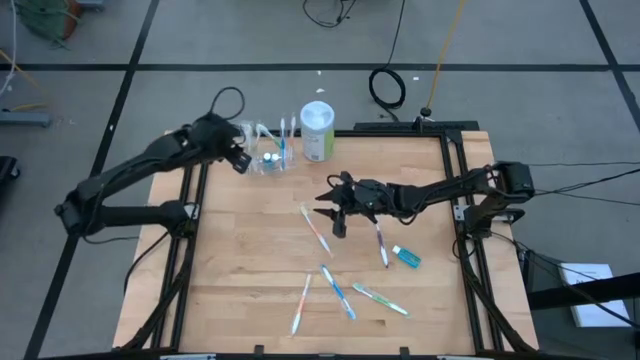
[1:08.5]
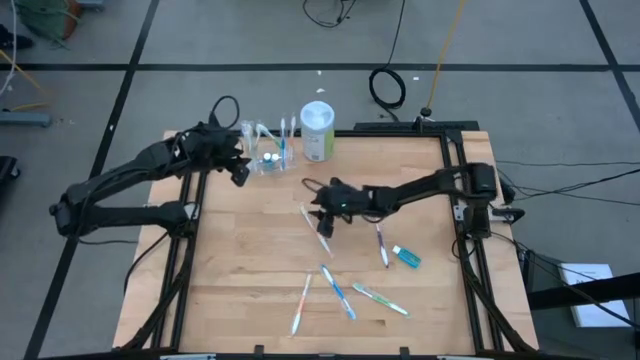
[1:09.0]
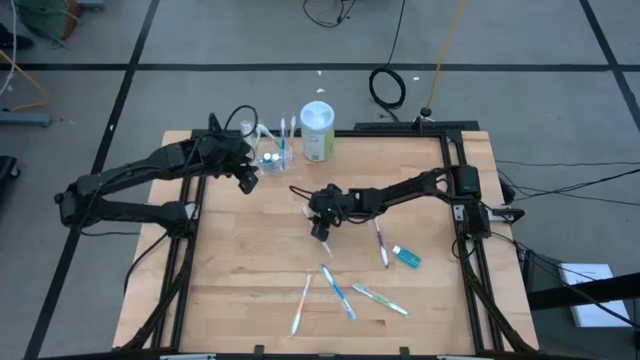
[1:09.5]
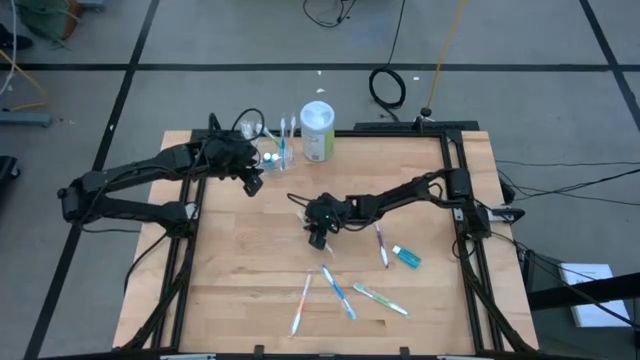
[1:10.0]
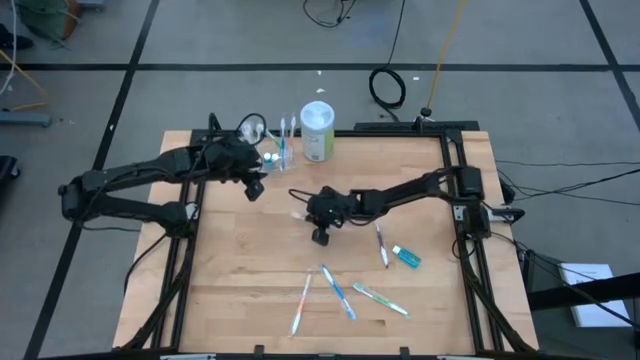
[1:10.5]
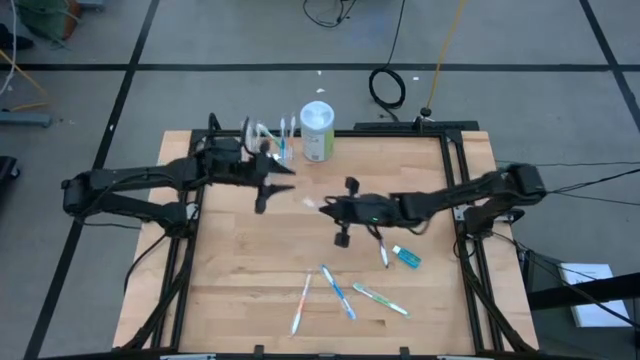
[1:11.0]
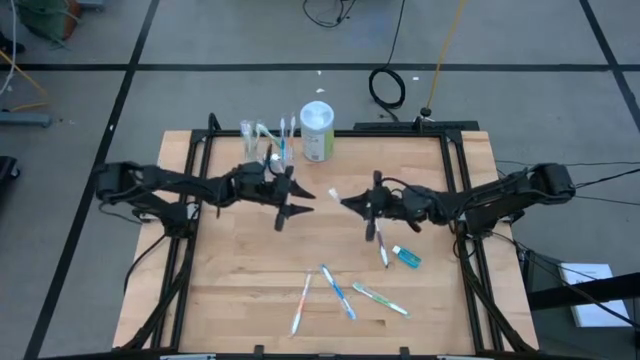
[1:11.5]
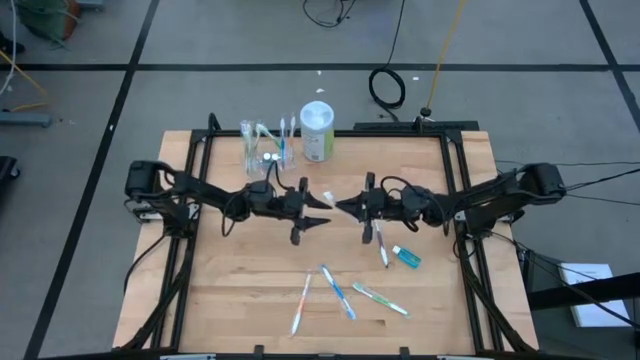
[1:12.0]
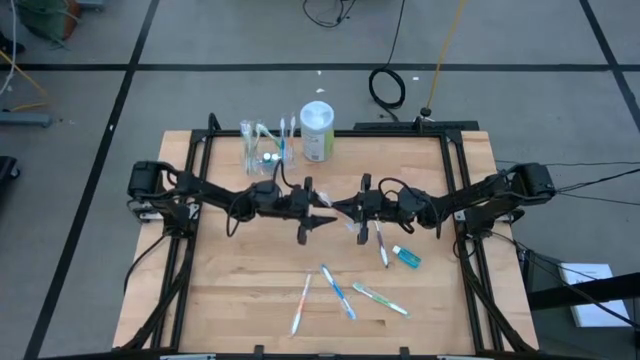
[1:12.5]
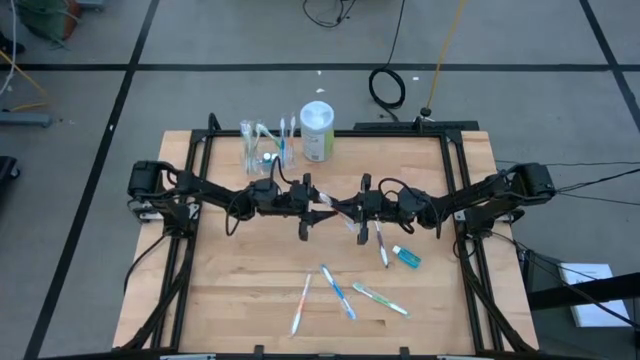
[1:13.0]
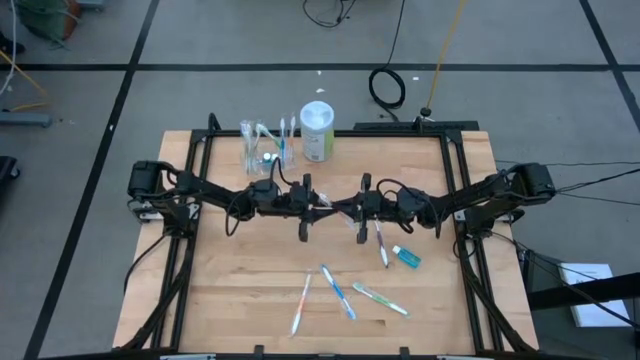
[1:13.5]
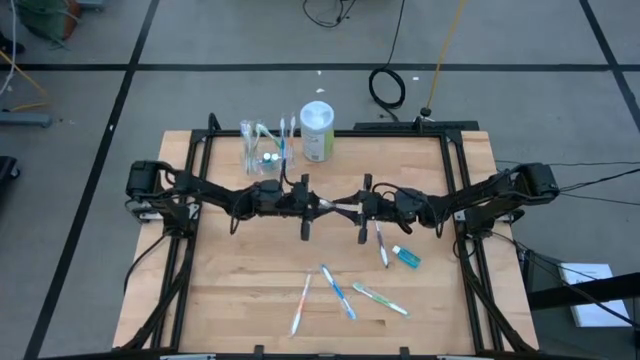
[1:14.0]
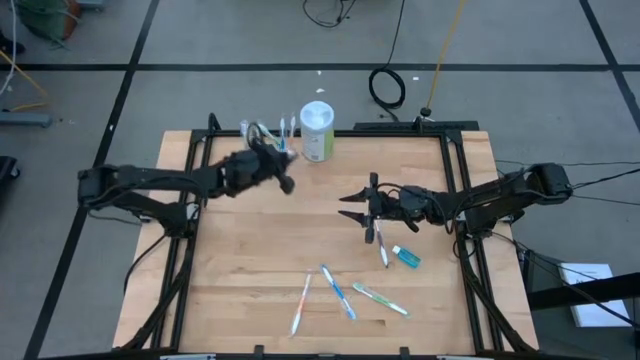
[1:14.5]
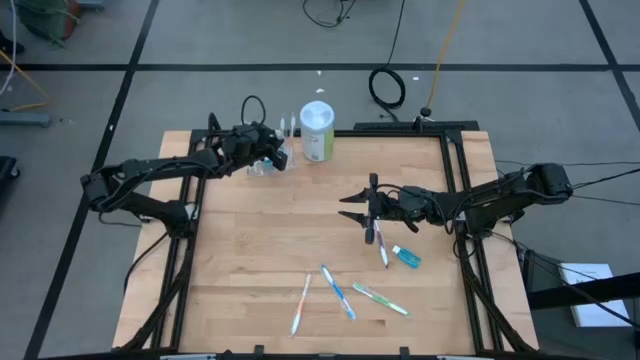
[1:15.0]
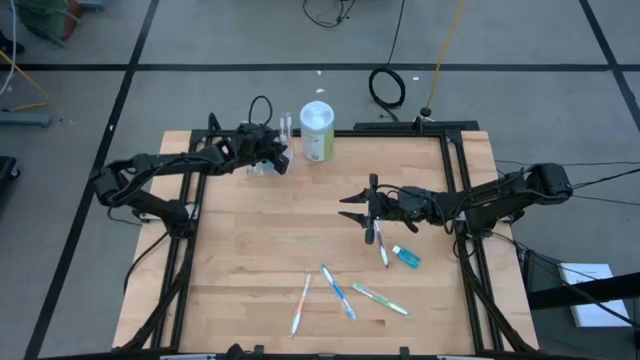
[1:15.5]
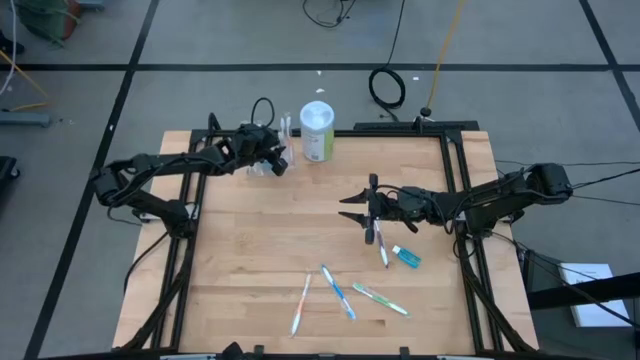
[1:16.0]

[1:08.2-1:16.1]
Task: Pick & Place toothbrushing station
Put the top orange toothbrush into the transparent organizer

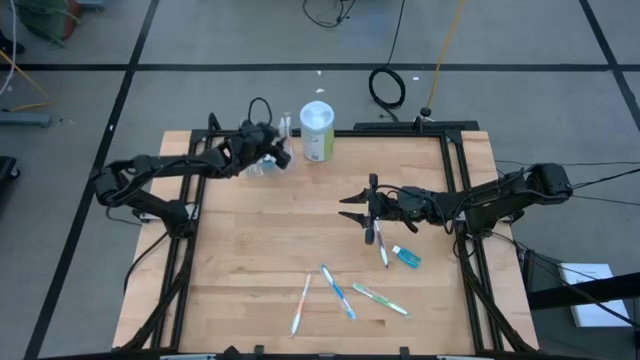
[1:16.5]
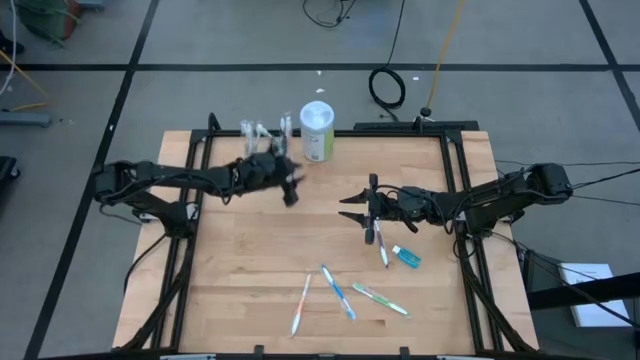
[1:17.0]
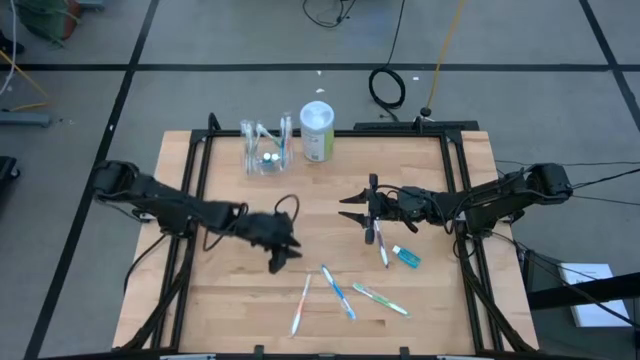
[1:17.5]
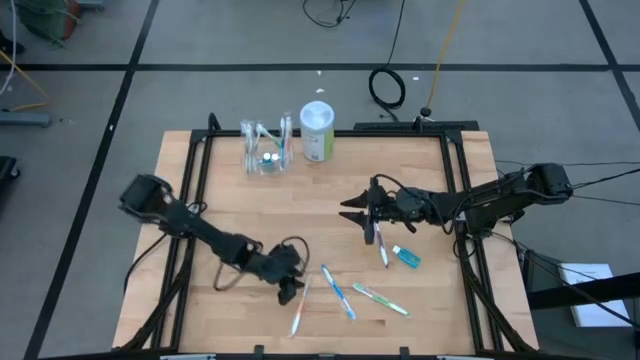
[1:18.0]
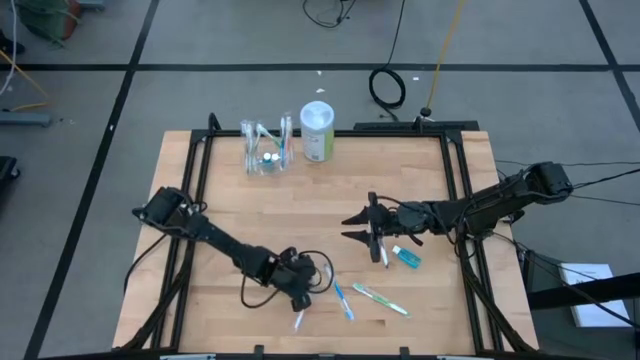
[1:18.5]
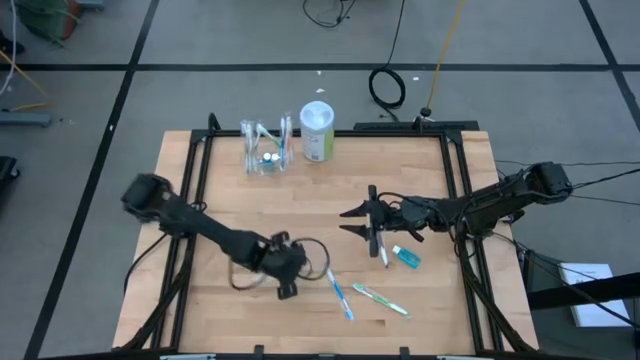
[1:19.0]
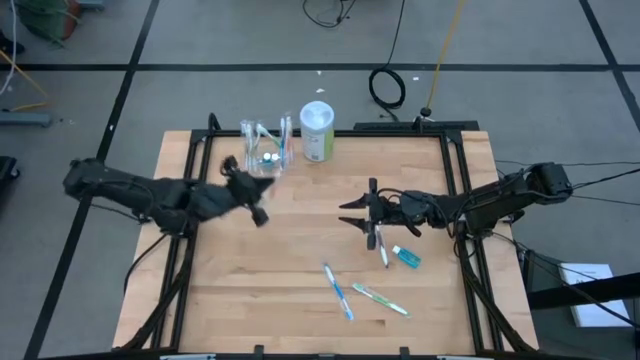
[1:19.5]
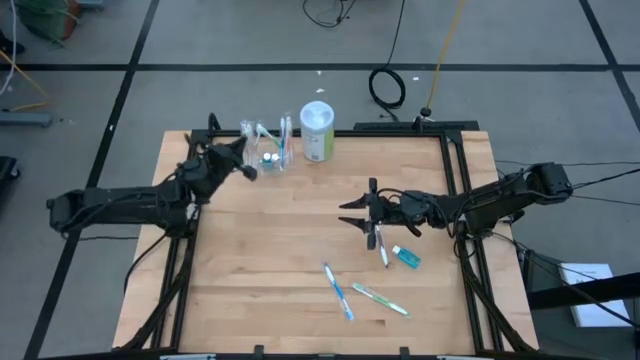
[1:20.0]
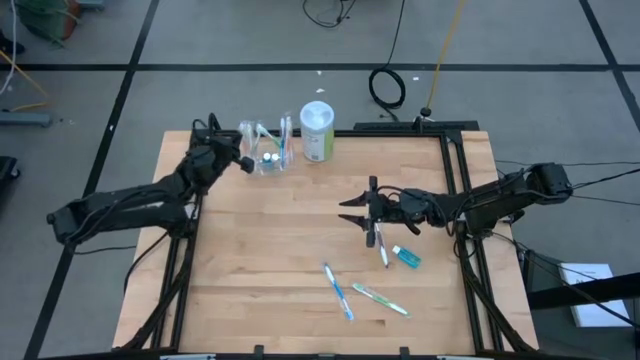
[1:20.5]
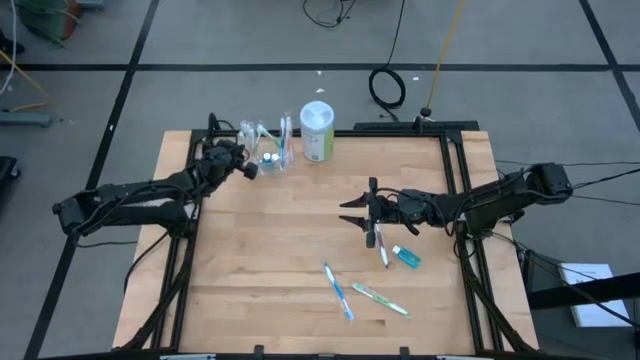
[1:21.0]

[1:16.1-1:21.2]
Put the orange toothbrush into the transparent organizer

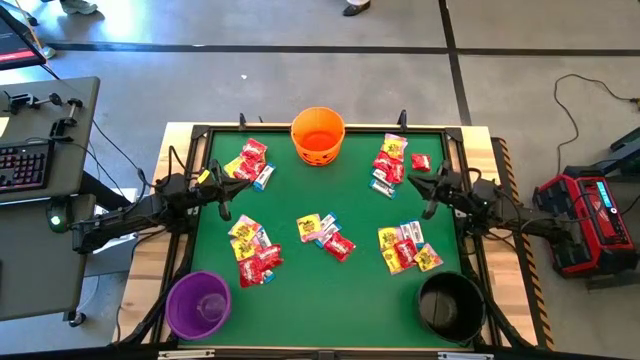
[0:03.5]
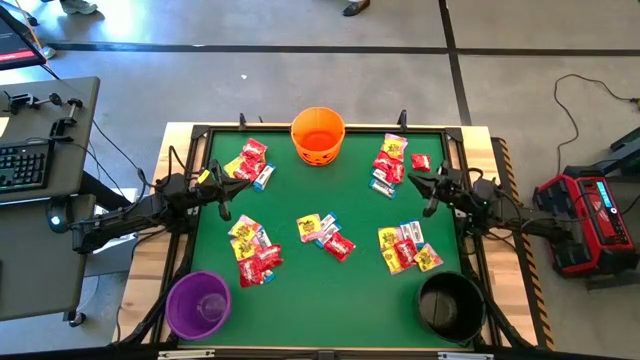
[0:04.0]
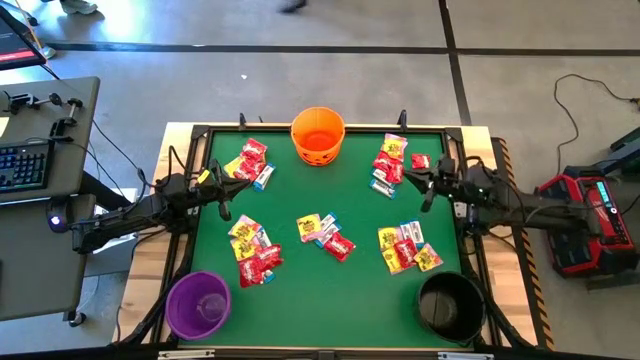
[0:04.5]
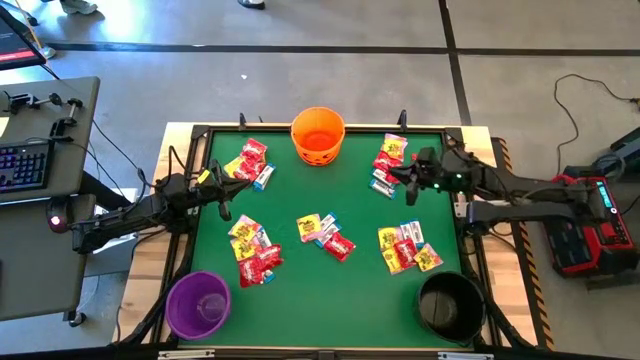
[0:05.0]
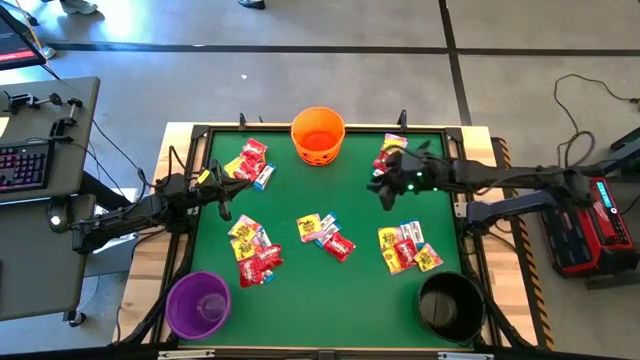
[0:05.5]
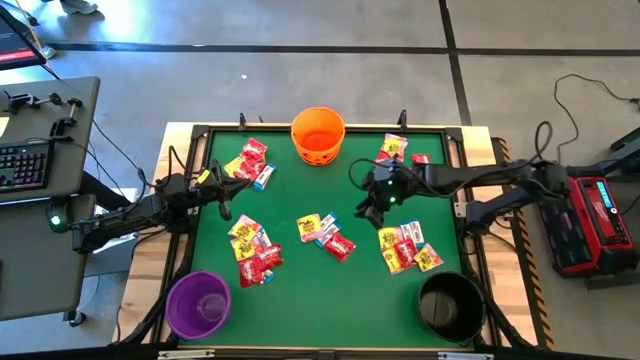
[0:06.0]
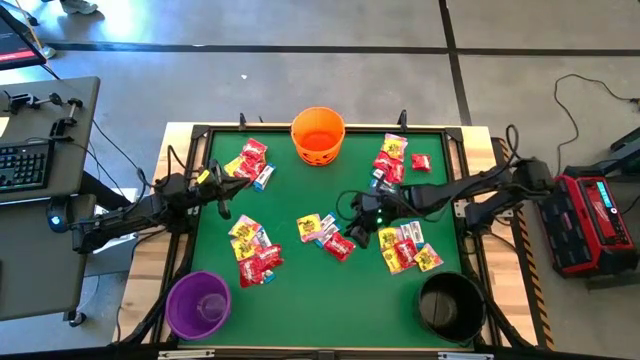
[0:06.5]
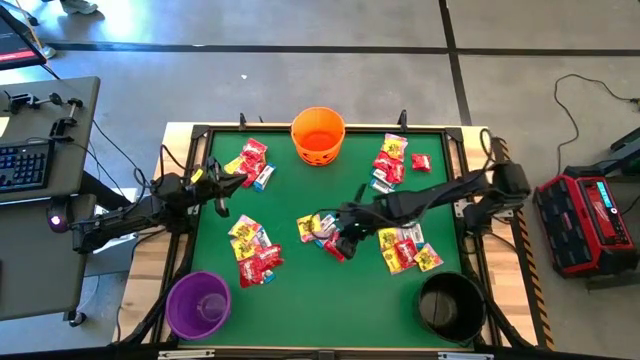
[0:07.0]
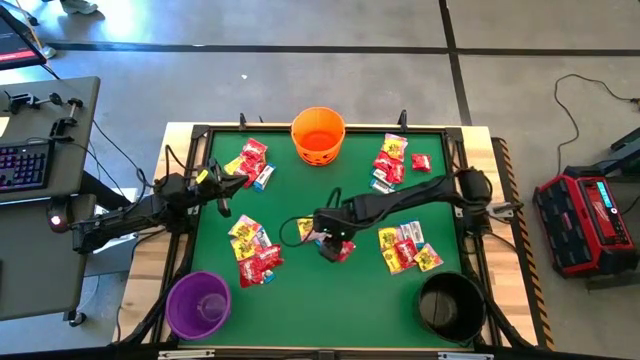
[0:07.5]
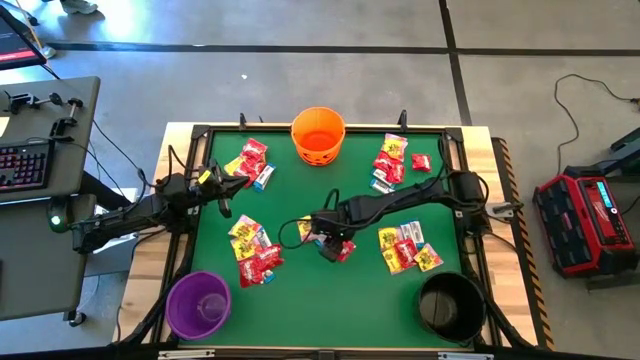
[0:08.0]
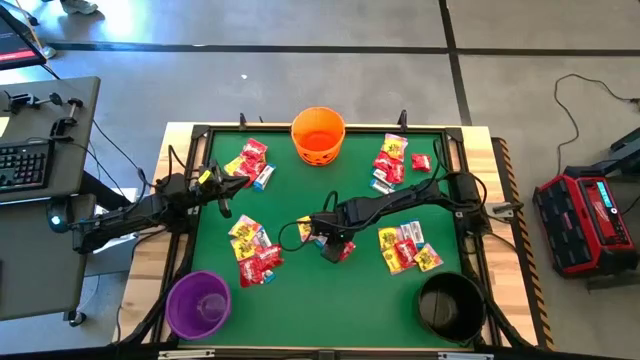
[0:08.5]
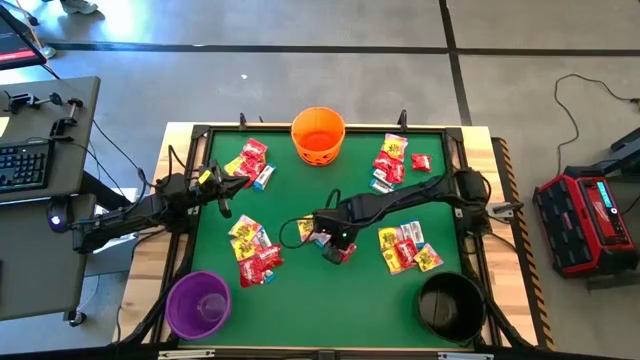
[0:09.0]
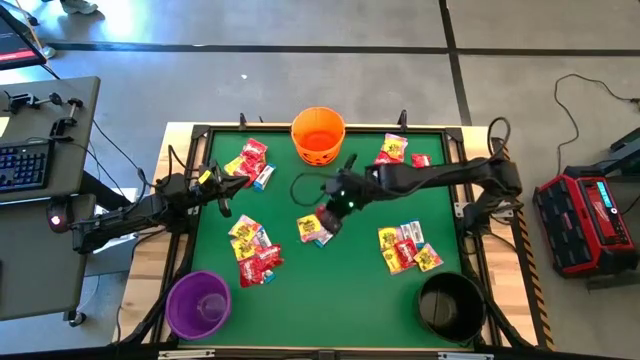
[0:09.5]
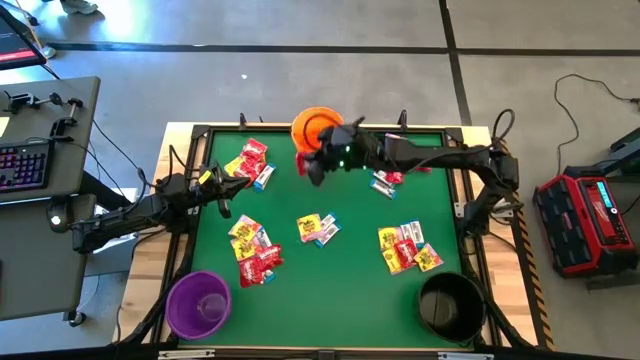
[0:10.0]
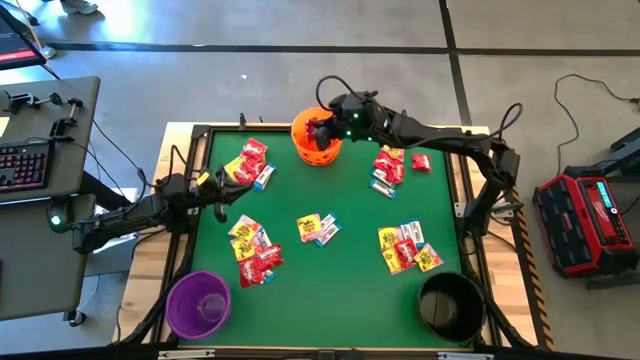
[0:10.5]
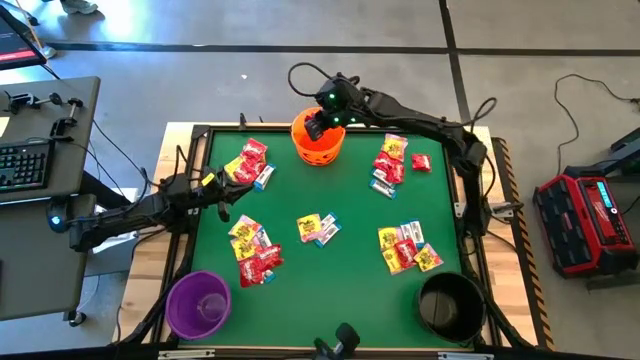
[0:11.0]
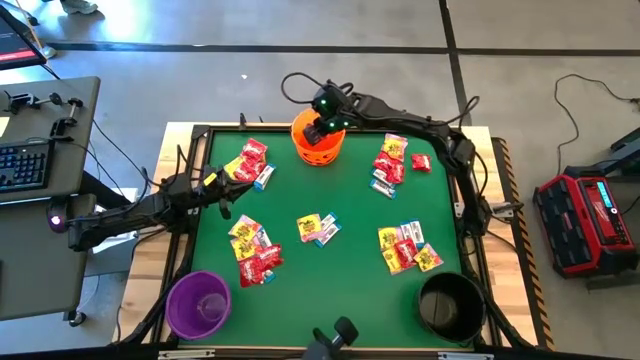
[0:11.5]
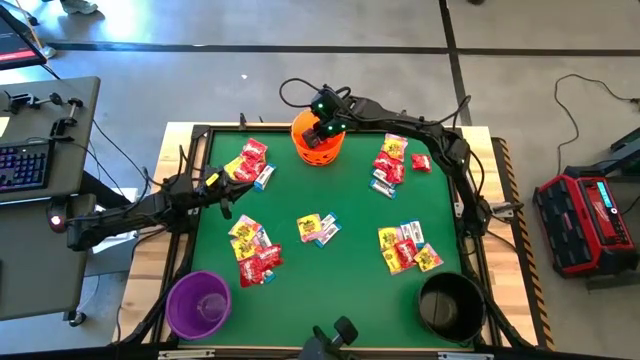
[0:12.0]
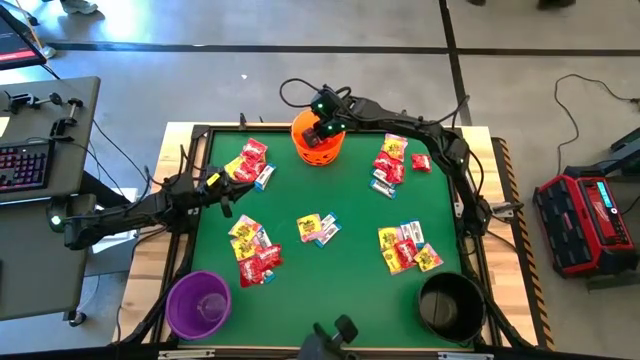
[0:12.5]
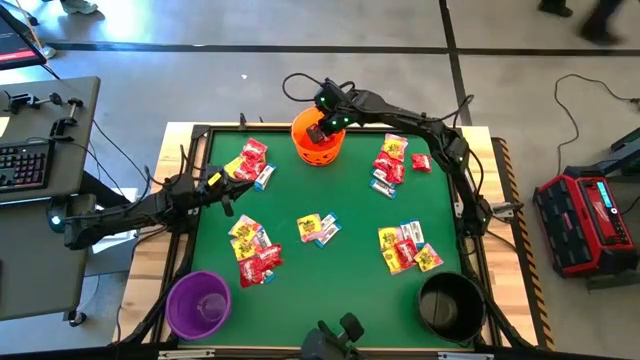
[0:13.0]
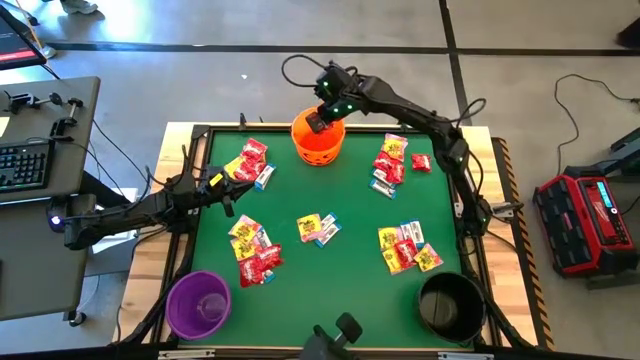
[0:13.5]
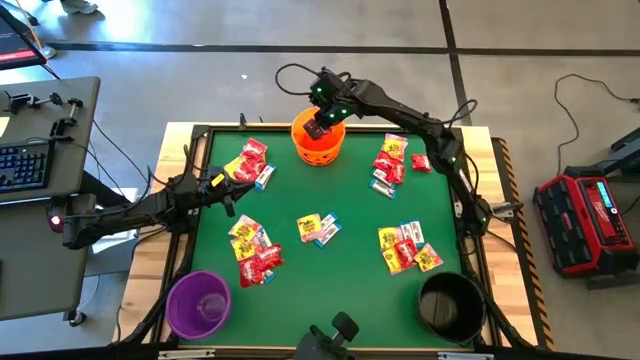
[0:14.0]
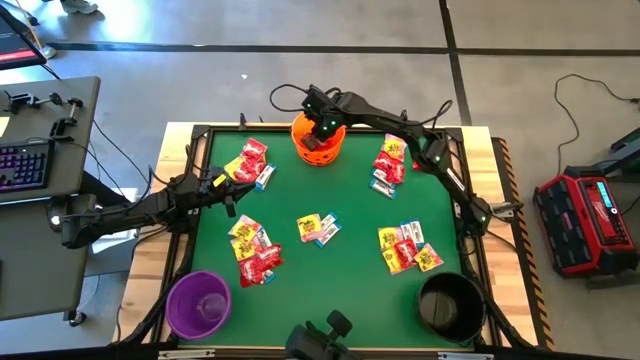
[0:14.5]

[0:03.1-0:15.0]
Task: Sort candy by brand, put in halloween buckets
Put the red candy into the orange bucket
